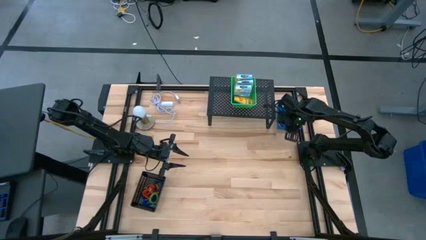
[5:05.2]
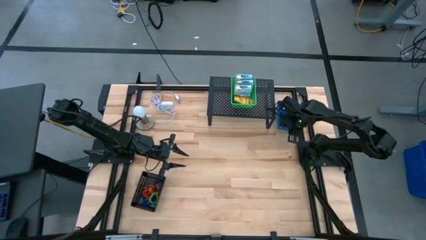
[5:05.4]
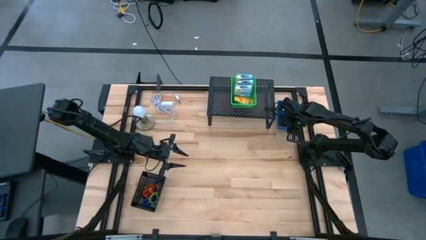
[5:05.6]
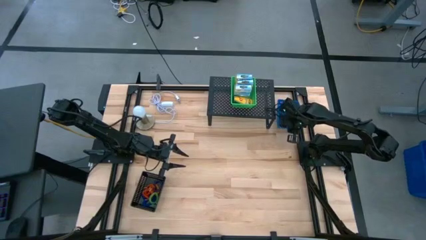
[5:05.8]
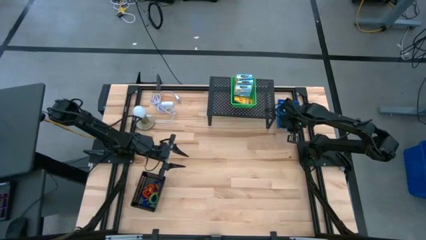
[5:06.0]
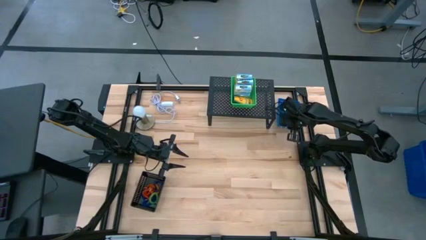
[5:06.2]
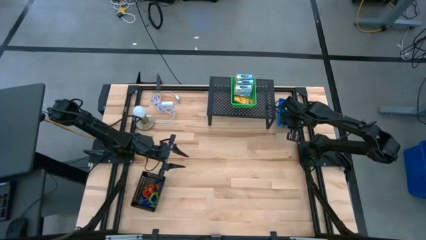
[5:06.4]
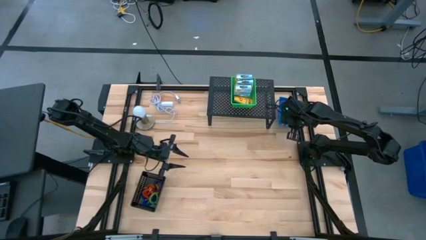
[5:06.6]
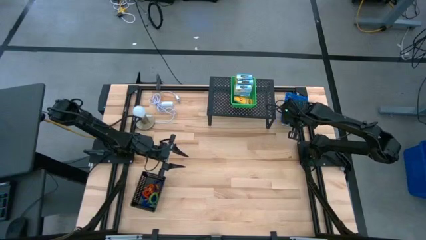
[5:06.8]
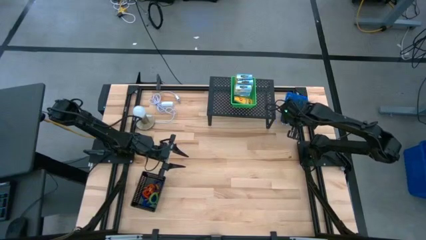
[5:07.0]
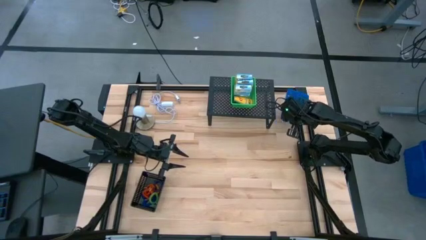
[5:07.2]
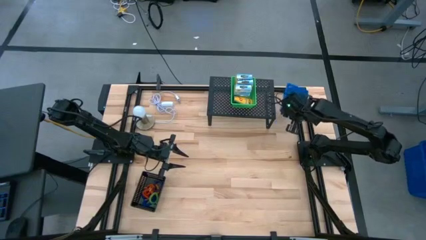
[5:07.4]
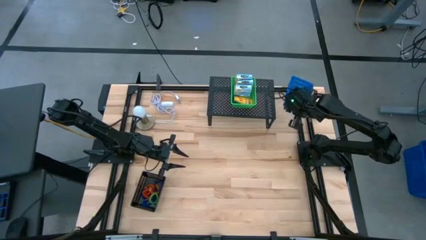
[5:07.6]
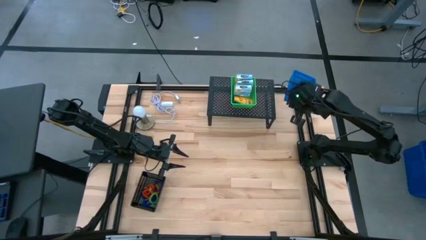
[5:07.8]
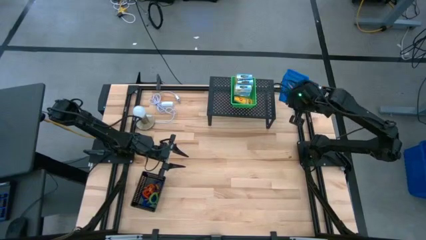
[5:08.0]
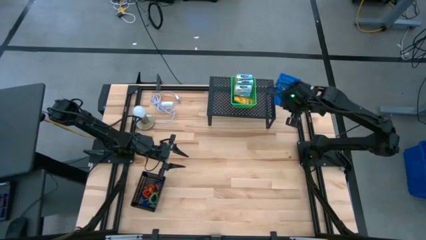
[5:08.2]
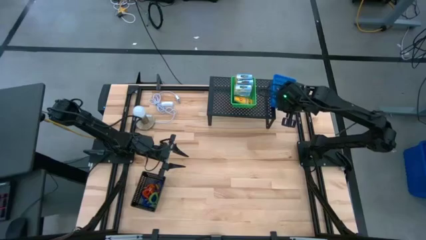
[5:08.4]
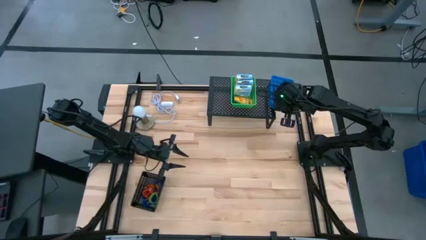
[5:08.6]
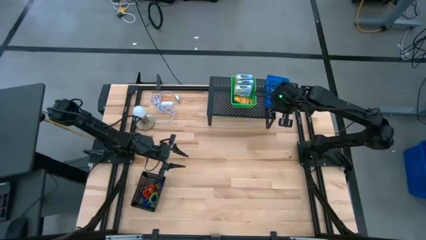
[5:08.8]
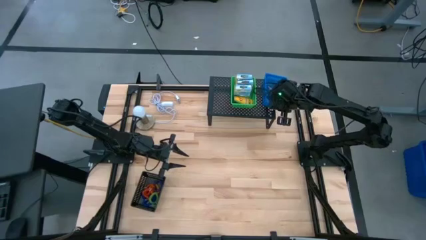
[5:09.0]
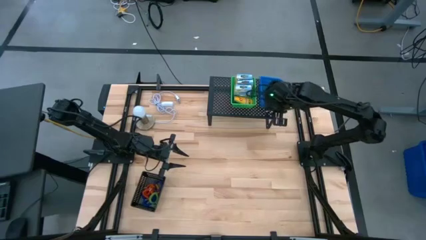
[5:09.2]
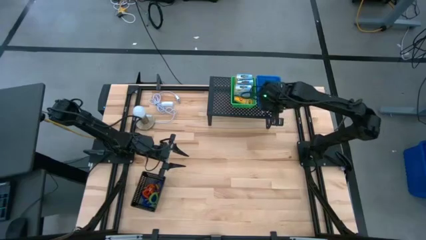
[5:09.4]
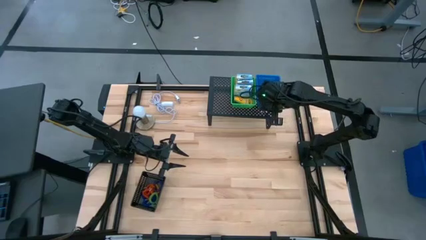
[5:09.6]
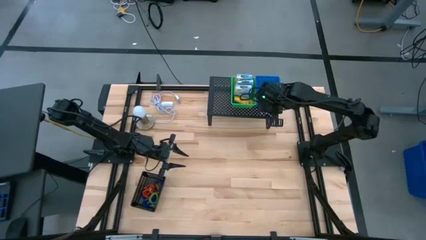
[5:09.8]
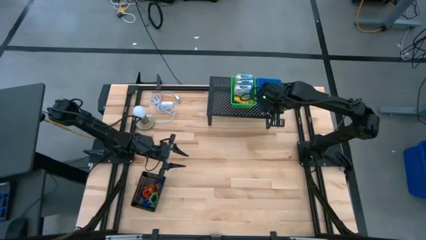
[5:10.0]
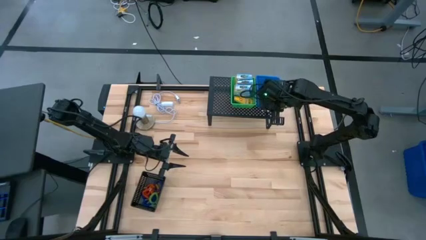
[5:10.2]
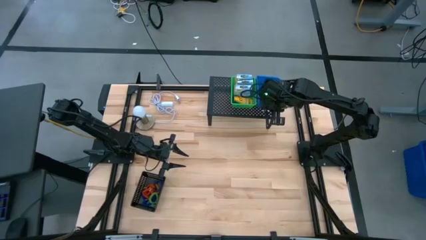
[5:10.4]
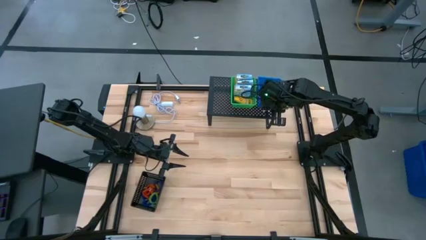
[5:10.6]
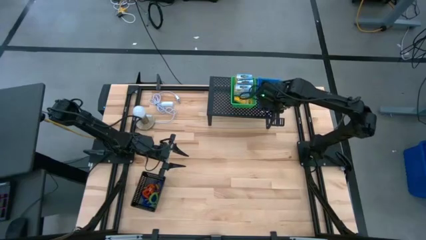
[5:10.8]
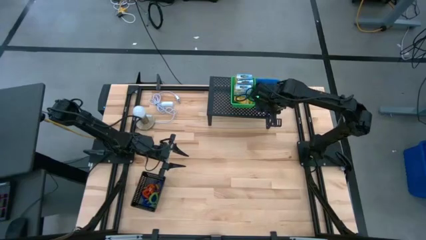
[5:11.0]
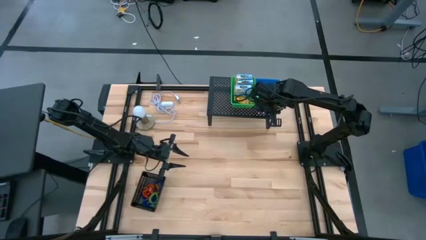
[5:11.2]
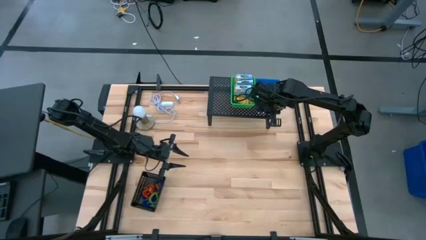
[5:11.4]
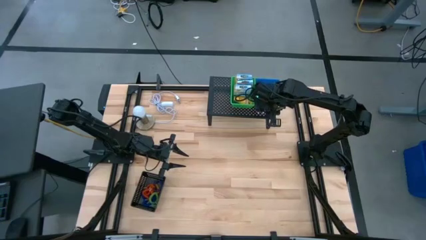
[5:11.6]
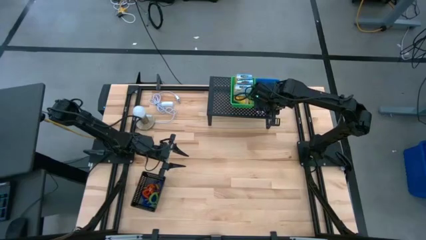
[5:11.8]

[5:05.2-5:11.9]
Task: Pick & Place Office Desk Supplies
Put the blue bin on the shelf

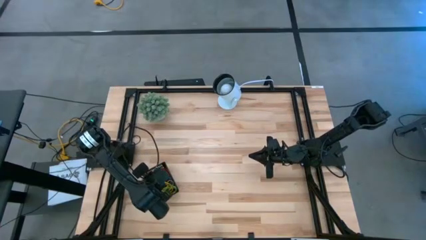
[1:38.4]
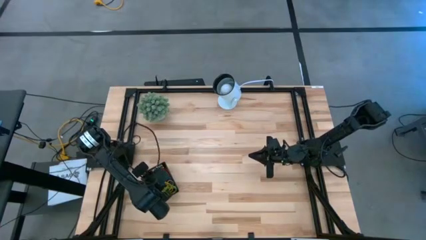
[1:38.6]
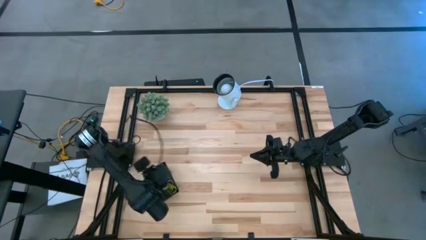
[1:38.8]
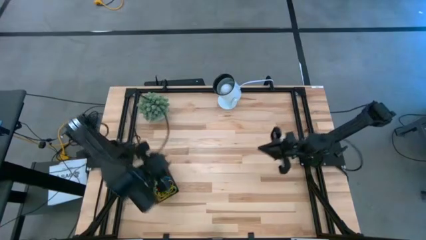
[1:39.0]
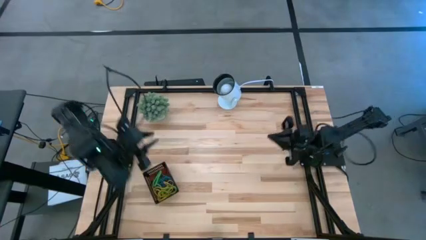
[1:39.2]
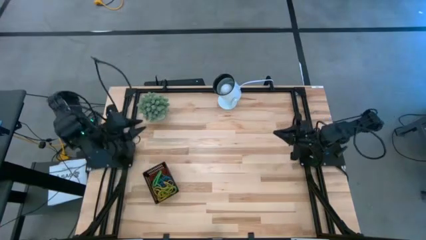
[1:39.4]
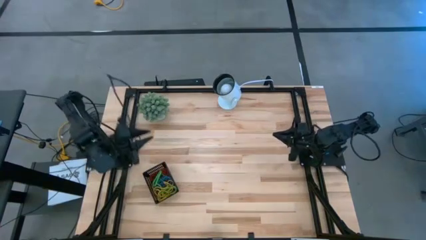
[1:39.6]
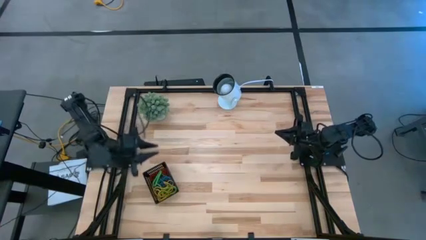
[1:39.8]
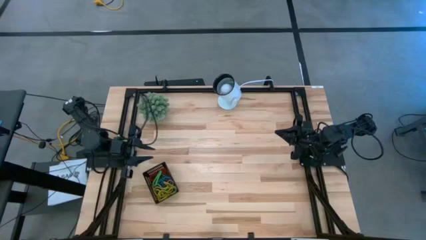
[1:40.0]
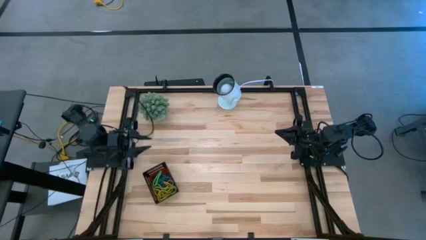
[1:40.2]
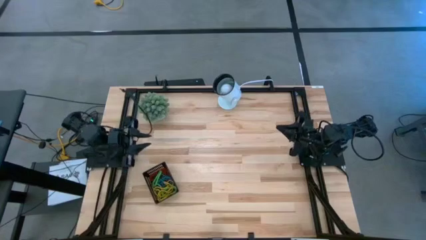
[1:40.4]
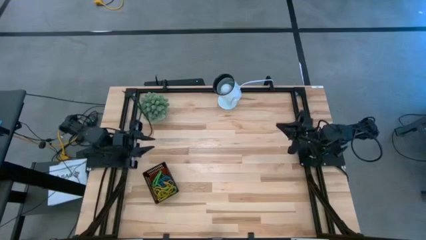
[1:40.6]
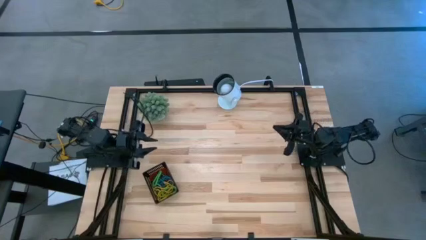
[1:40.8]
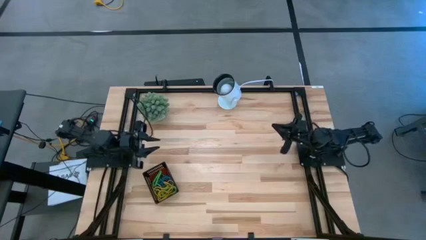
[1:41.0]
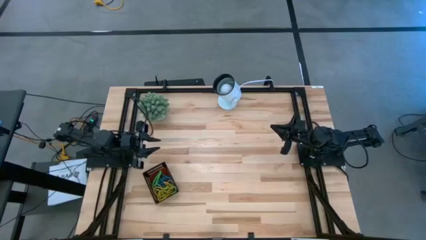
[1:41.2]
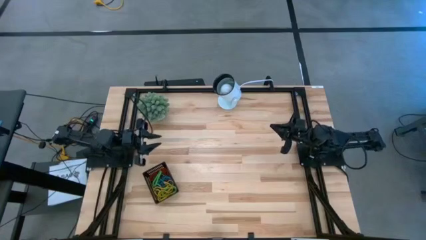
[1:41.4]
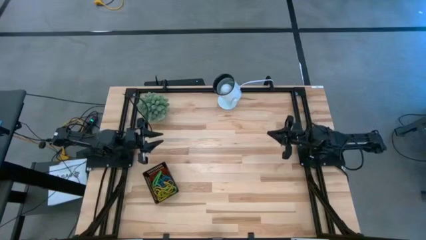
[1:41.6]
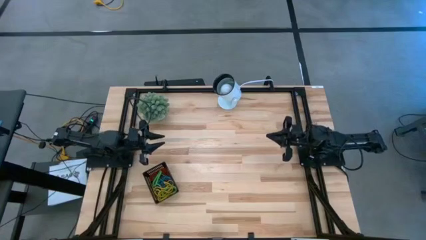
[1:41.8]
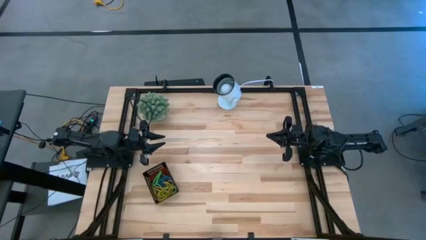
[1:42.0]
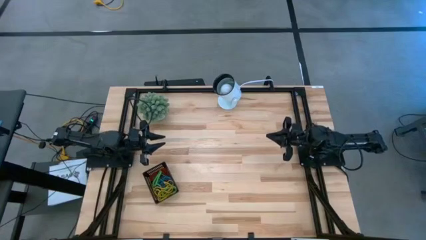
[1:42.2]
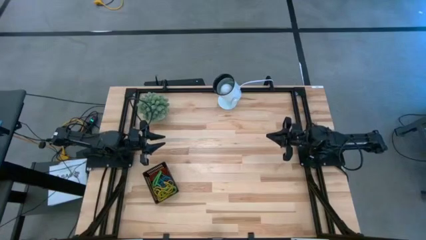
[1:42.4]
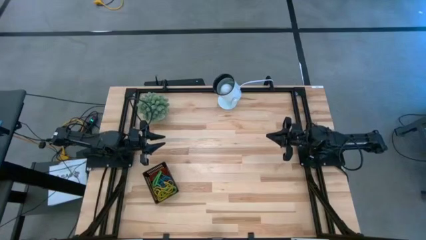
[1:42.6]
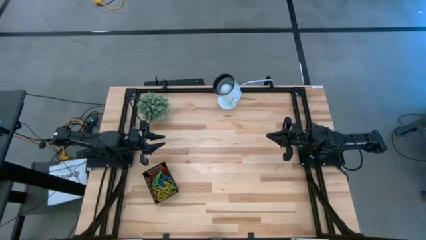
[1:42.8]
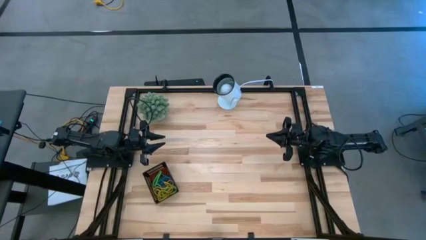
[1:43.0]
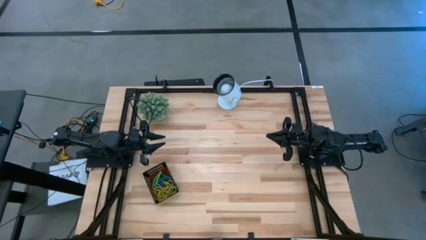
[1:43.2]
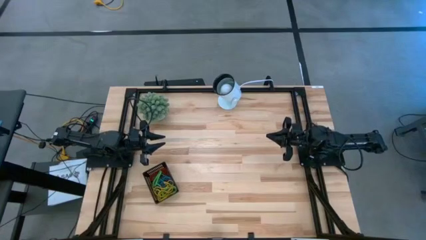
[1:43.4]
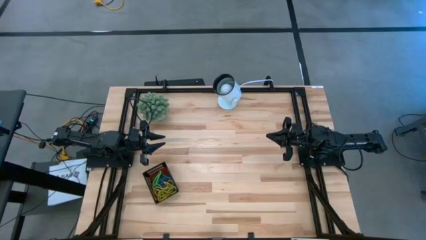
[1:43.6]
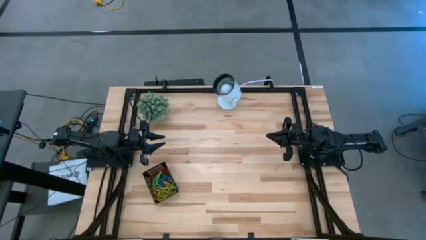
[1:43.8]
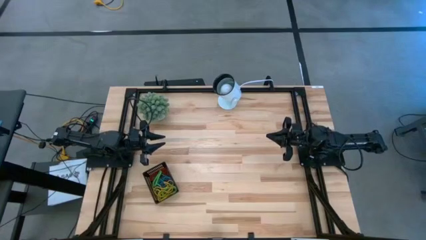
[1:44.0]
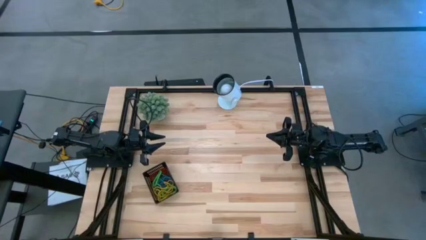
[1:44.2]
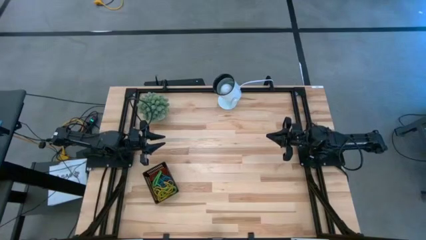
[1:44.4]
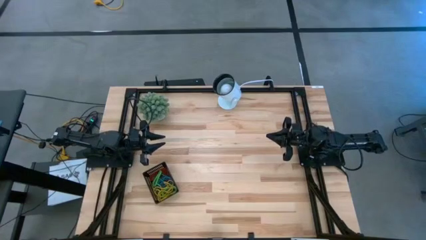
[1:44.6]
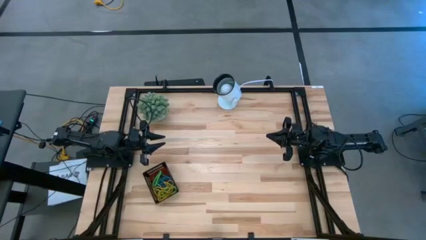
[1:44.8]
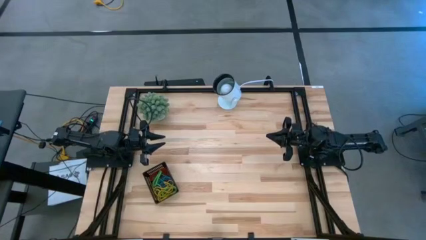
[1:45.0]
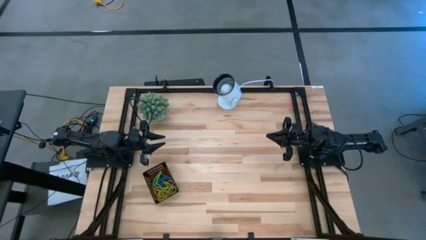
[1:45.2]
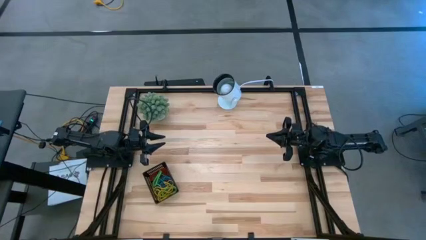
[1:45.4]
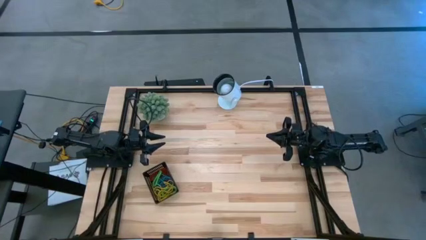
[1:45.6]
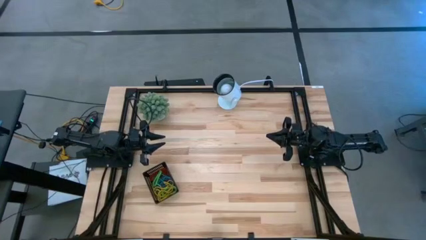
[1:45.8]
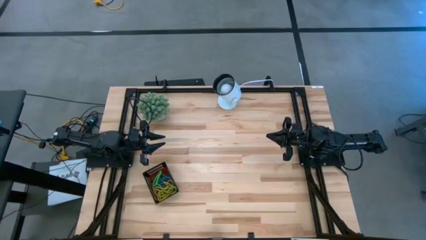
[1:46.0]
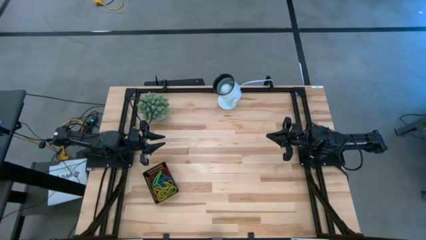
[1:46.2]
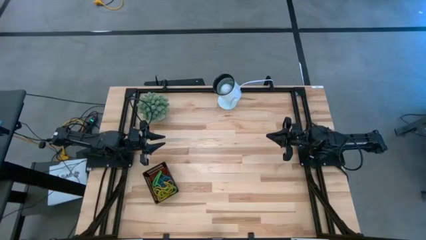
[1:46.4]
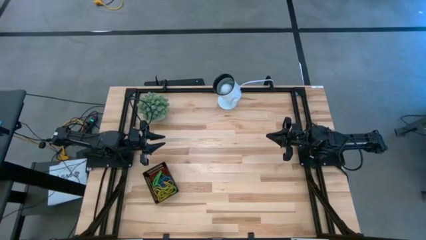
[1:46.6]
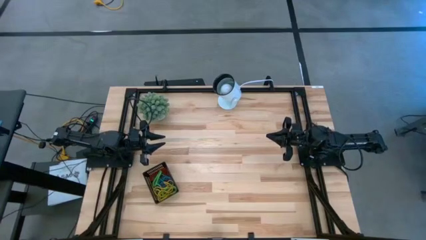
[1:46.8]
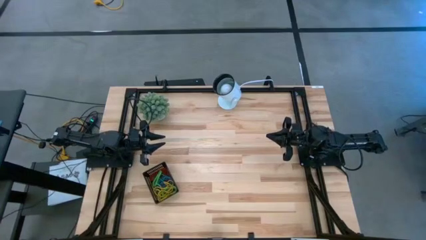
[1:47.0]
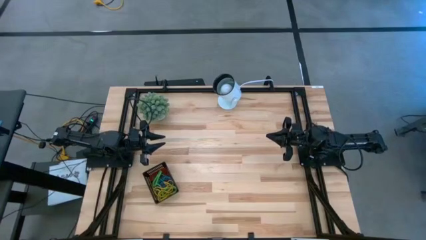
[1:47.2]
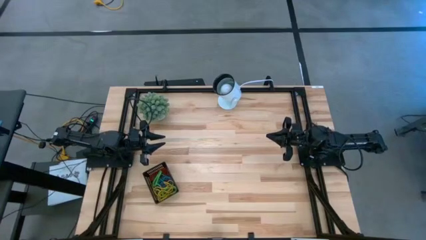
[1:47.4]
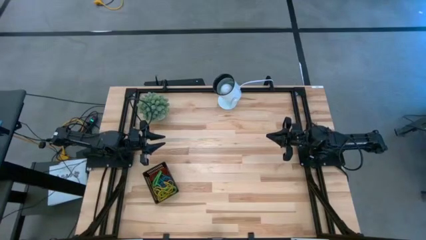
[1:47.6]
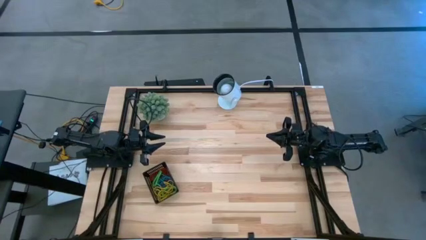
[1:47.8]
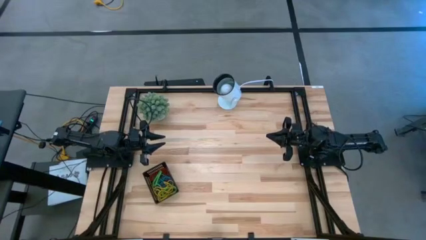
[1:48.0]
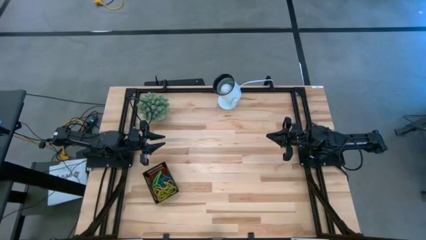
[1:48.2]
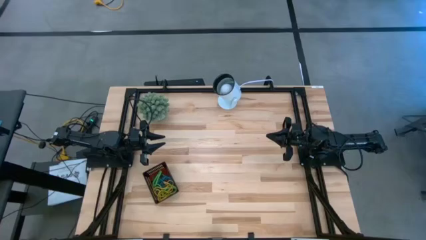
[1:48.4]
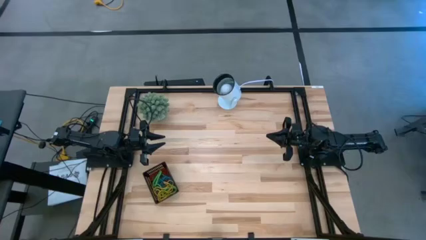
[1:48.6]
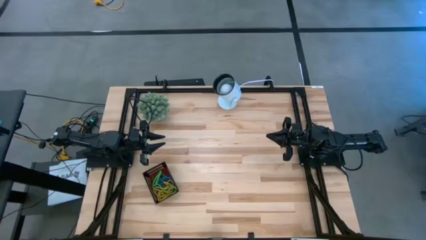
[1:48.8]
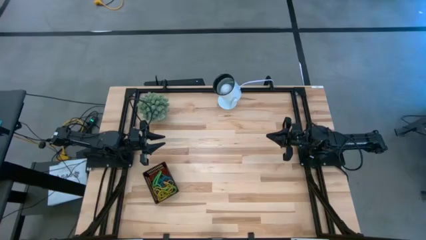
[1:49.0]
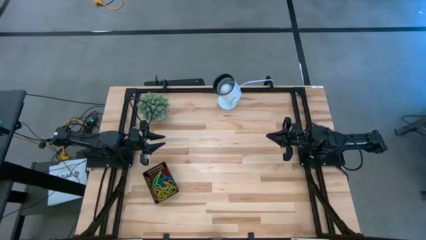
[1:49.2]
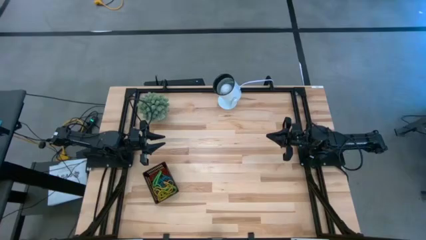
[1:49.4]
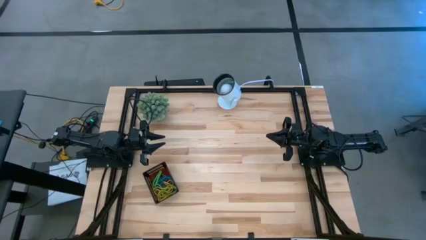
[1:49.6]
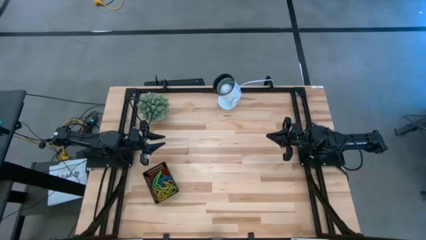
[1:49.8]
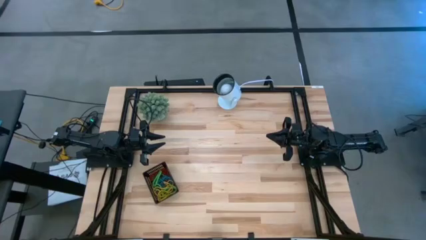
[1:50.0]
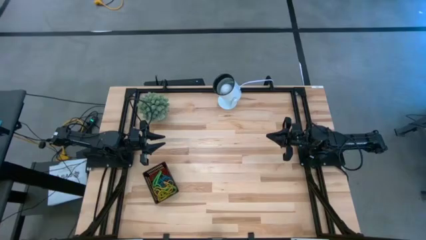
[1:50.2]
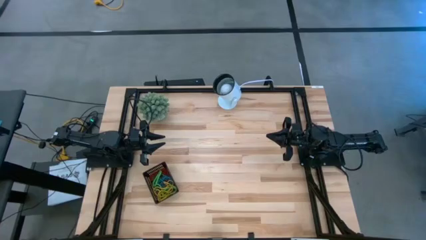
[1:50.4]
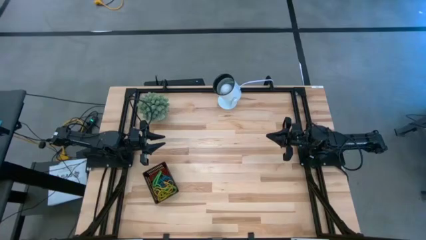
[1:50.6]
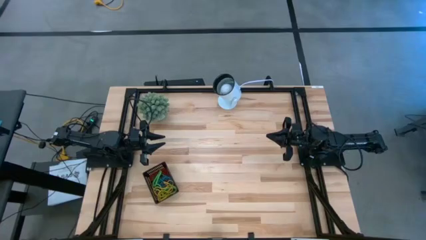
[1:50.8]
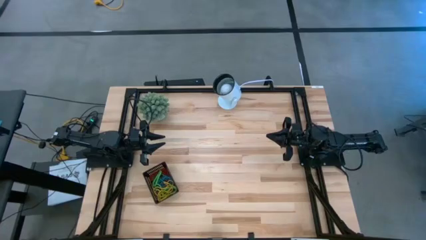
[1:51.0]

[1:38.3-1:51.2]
Task: Pick and place items into bin
Return to Home Position
